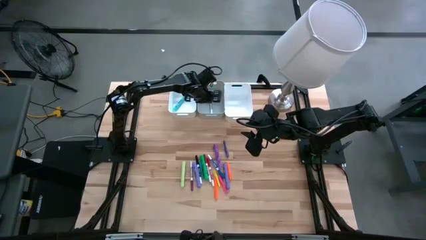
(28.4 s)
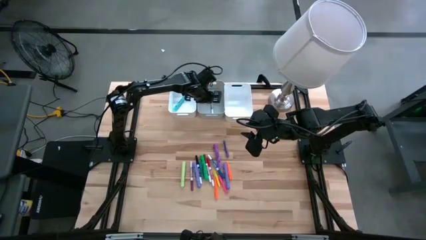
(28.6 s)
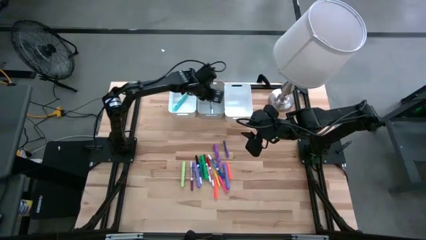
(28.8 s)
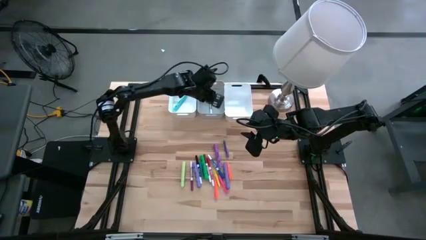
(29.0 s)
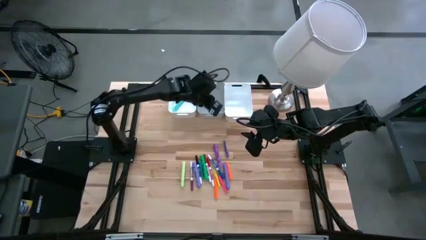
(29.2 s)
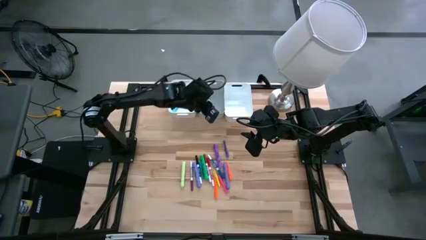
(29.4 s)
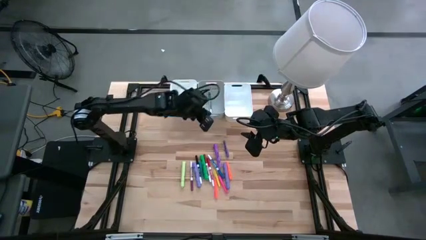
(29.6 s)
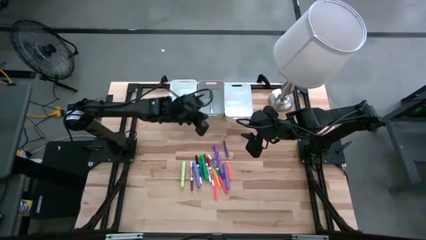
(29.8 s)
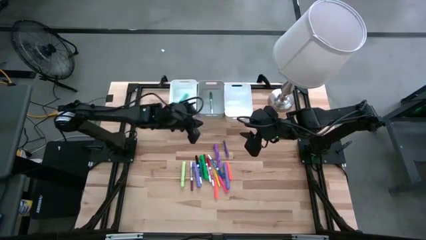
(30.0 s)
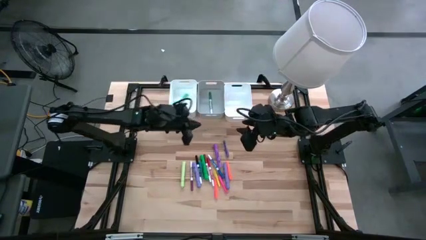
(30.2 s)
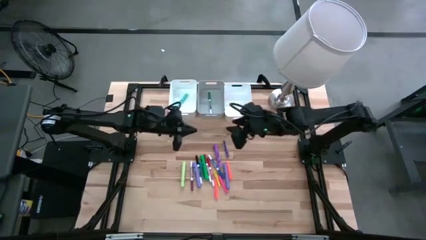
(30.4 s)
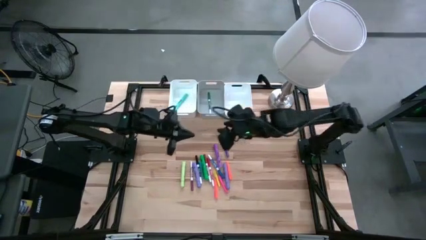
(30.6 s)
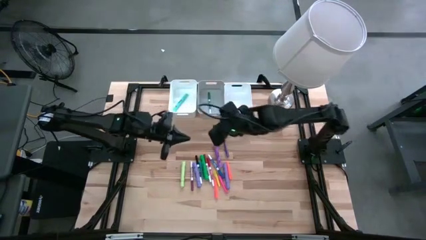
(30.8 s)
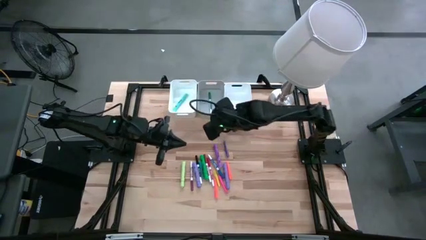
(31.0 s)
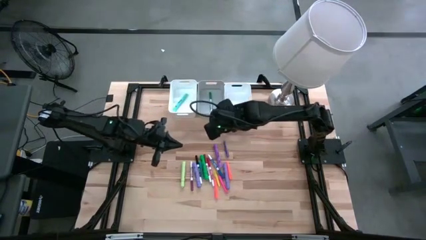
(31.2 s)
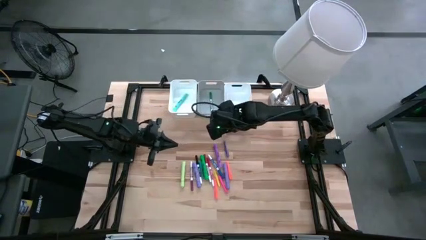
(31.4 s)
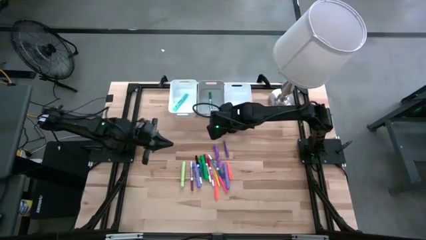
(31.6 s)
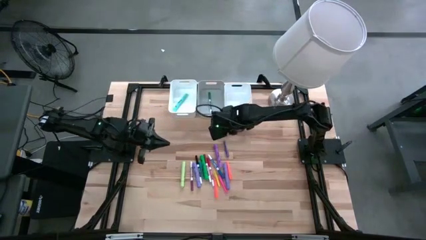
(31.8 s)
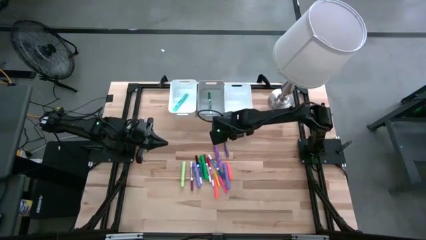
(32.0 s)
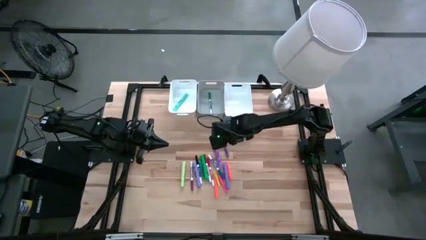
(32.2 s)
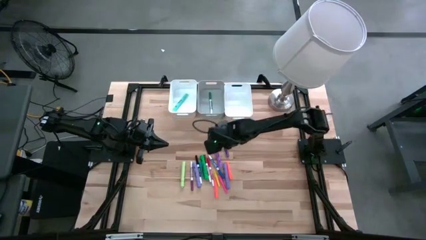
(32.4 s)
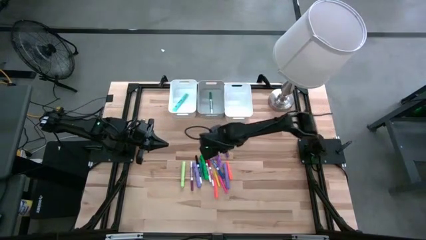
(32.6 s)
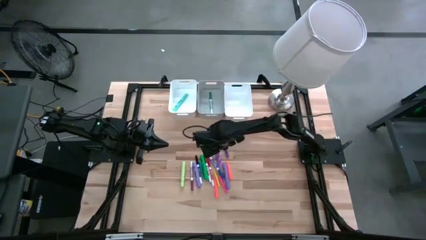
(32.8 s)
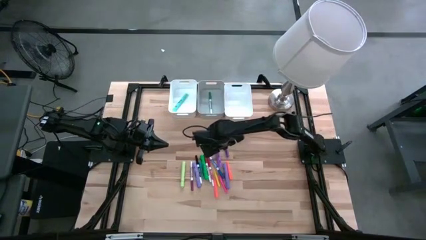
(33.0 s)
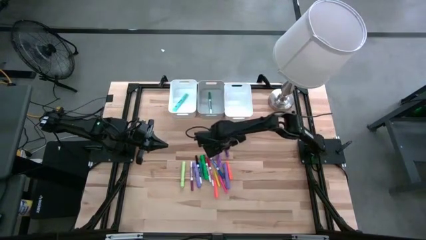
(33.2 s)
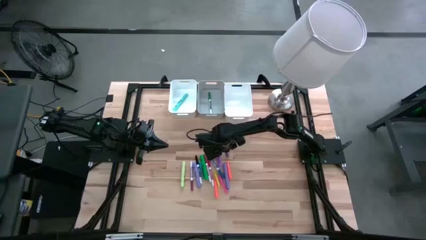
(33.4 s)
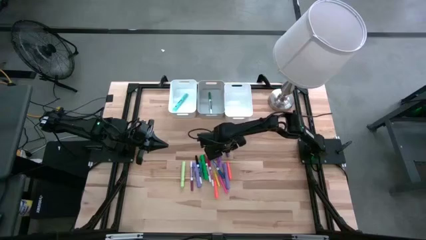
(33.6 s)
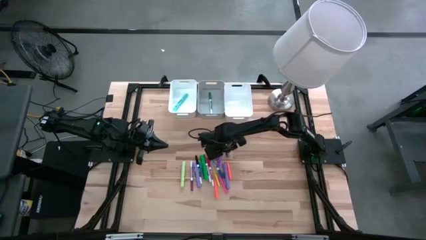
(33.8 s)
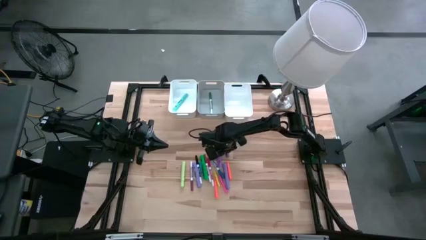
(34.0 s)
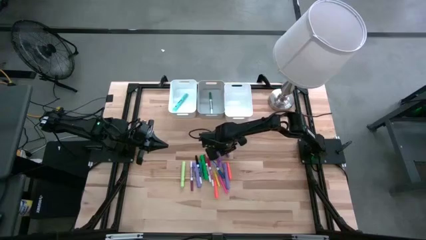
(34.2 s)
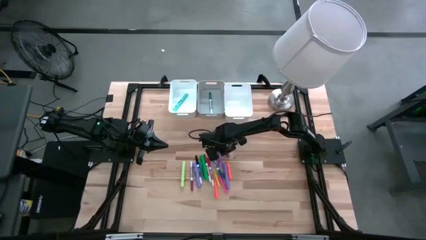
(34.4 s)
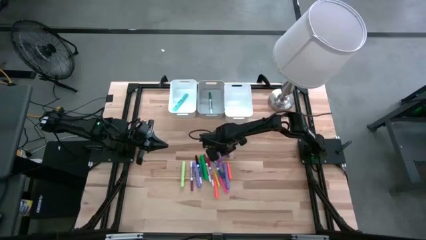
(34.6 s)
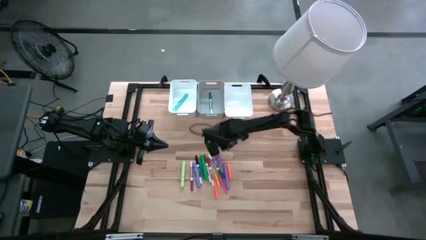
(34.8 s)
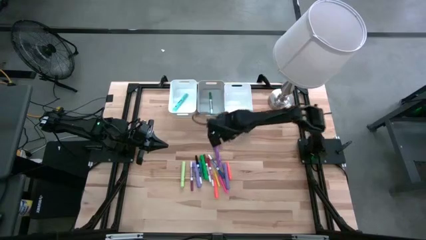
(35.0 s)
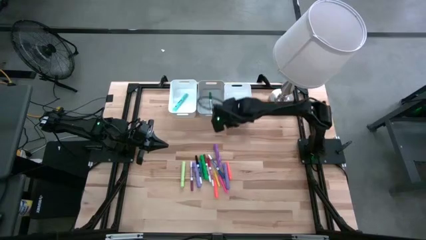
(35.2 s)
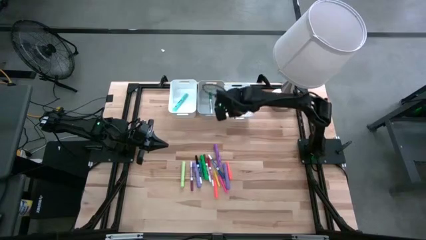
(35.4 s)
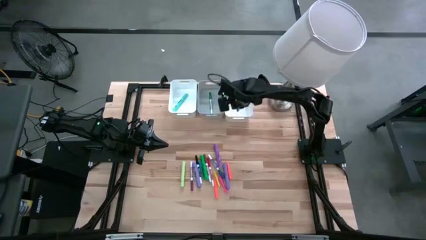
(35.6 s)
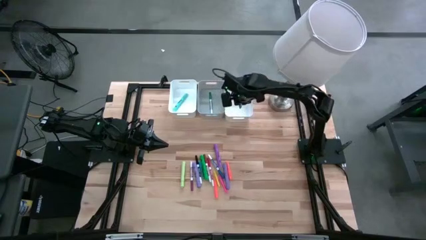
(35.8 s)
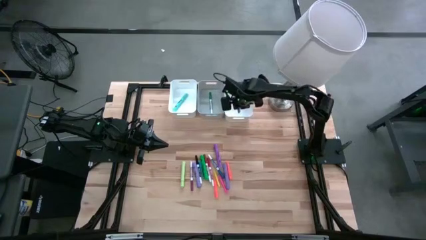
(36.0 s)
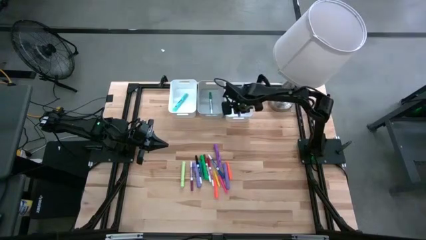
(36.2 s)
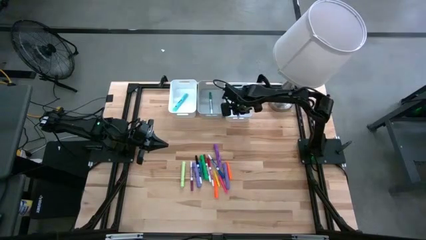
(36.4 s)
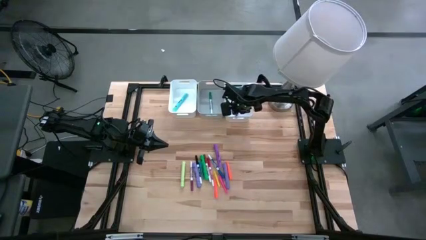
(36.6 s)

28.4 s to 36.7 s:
Task: Pick & Place Markers
Put the violet pen into the right white bin

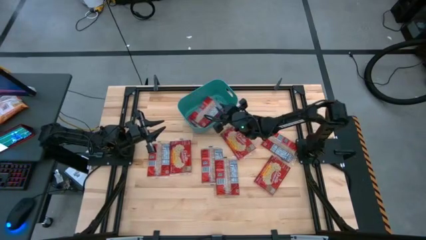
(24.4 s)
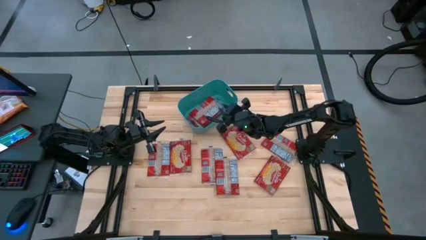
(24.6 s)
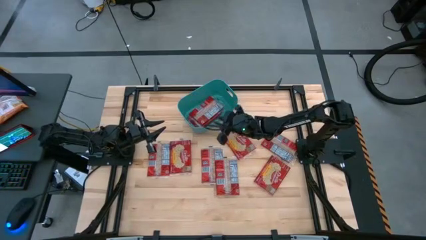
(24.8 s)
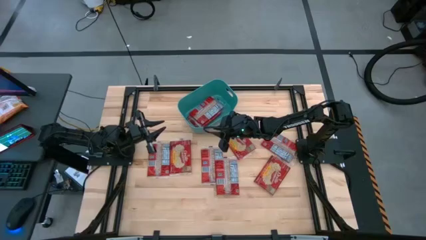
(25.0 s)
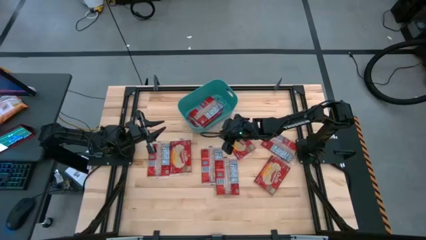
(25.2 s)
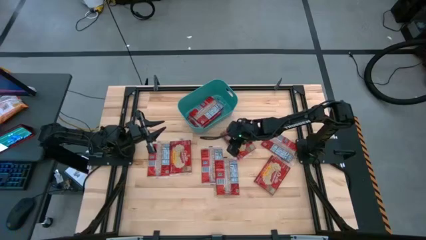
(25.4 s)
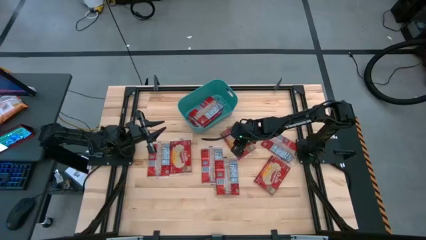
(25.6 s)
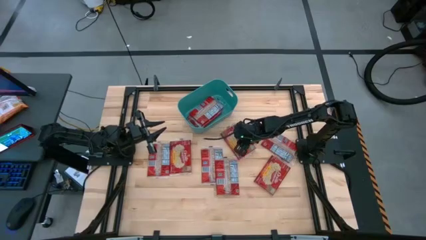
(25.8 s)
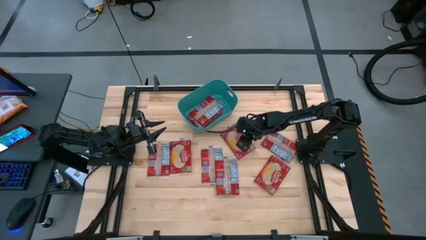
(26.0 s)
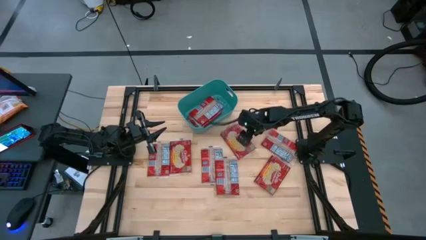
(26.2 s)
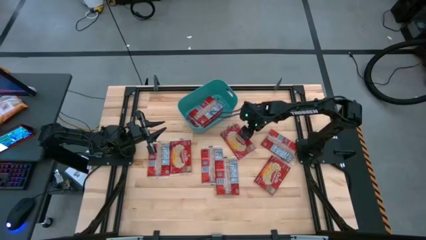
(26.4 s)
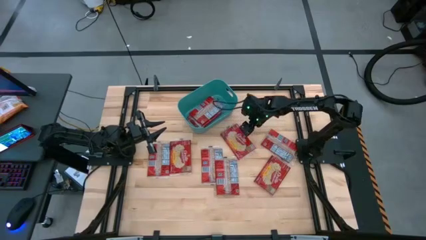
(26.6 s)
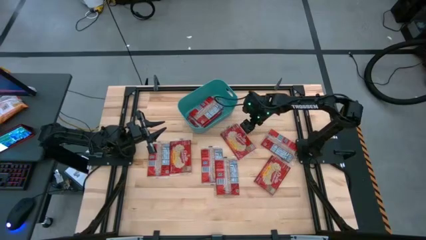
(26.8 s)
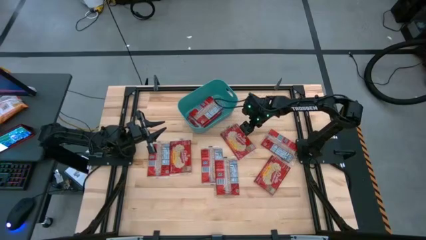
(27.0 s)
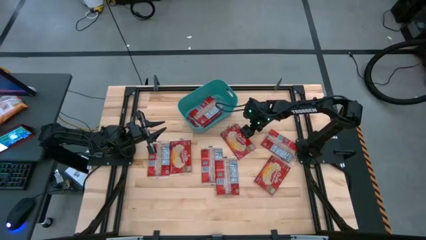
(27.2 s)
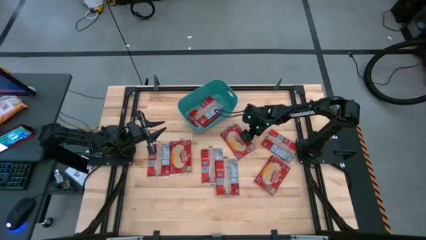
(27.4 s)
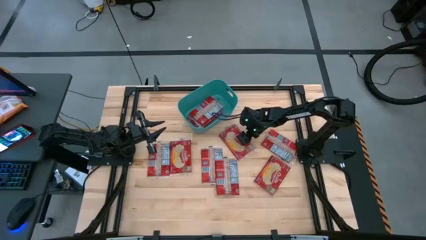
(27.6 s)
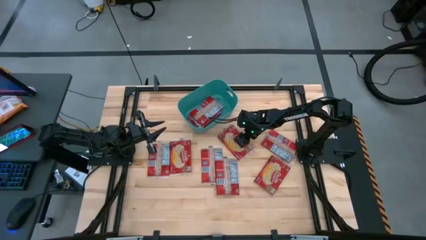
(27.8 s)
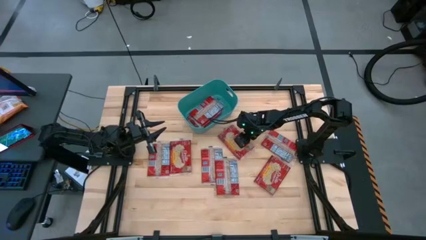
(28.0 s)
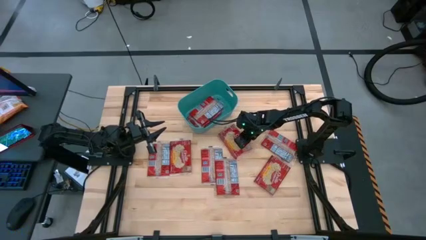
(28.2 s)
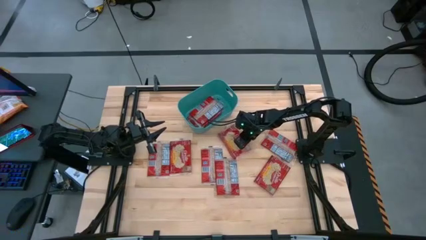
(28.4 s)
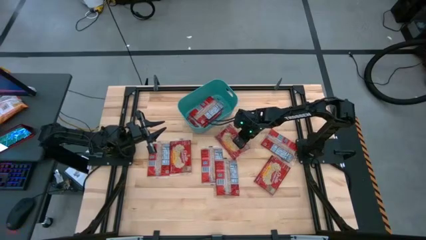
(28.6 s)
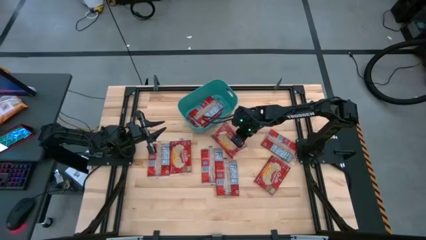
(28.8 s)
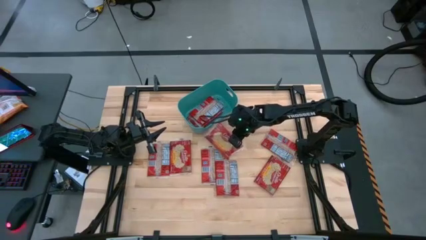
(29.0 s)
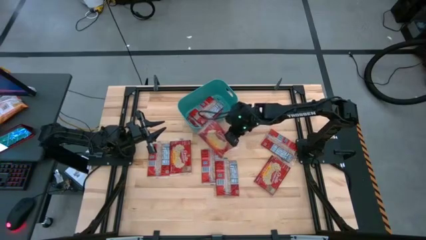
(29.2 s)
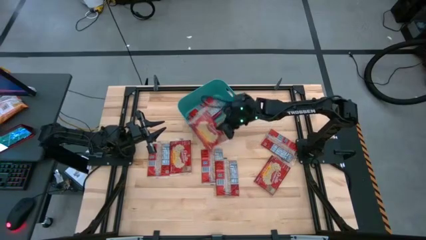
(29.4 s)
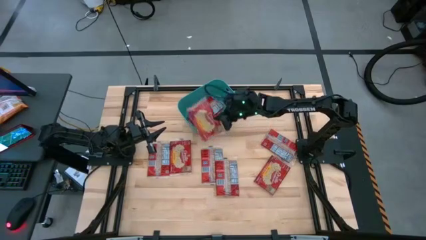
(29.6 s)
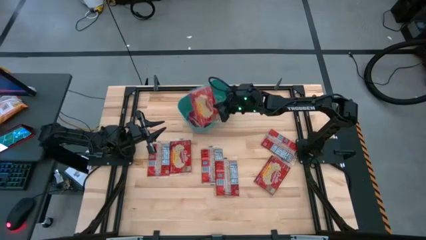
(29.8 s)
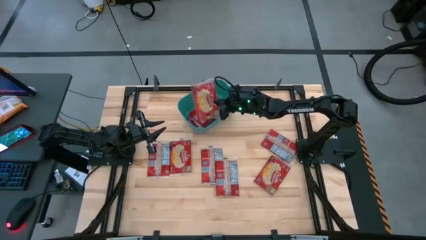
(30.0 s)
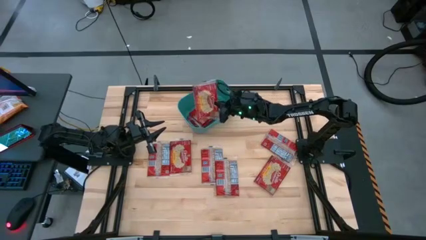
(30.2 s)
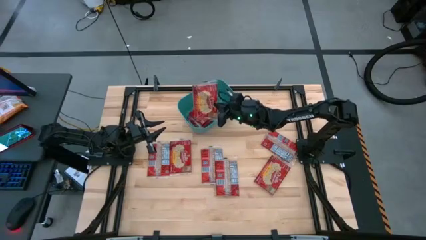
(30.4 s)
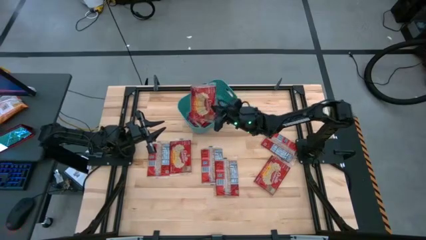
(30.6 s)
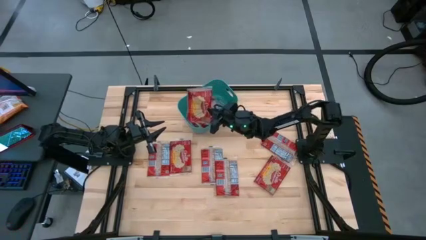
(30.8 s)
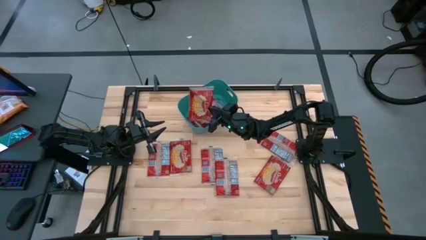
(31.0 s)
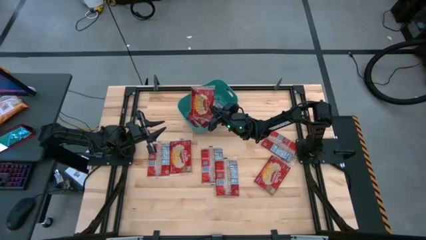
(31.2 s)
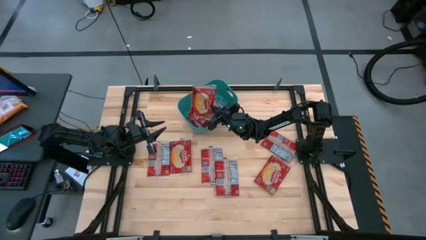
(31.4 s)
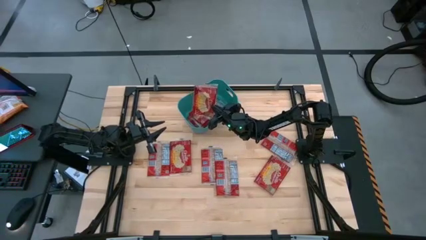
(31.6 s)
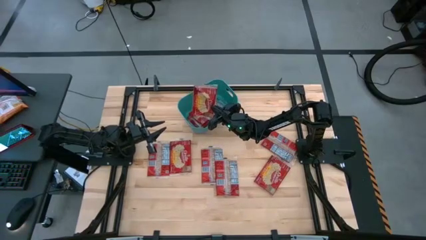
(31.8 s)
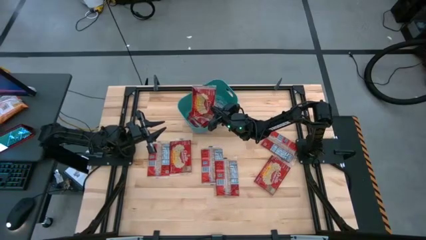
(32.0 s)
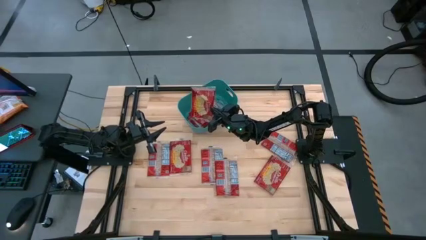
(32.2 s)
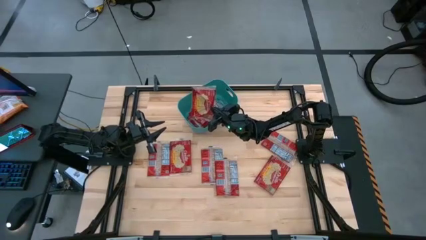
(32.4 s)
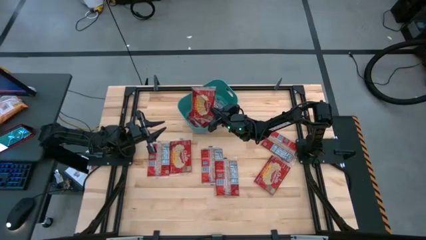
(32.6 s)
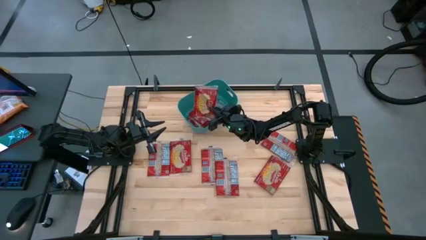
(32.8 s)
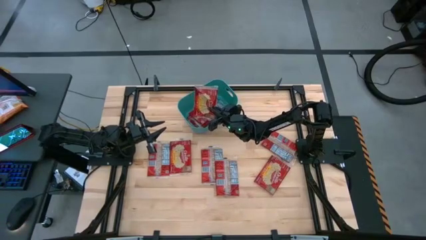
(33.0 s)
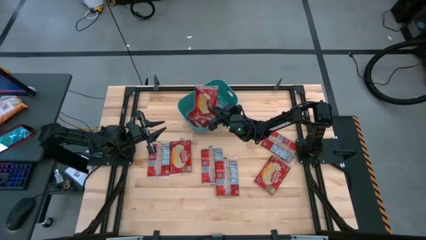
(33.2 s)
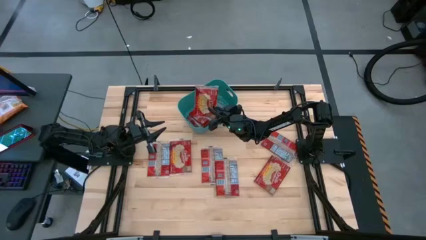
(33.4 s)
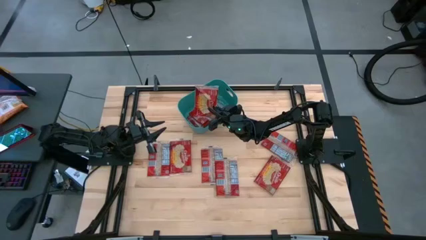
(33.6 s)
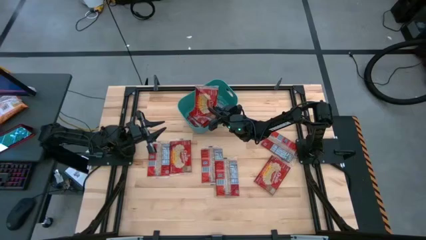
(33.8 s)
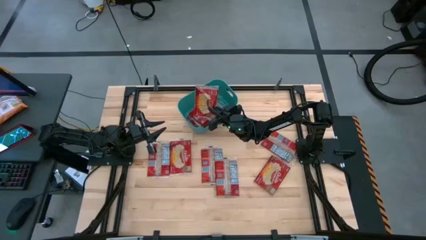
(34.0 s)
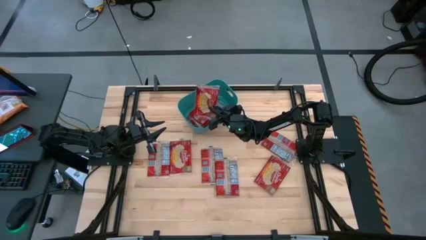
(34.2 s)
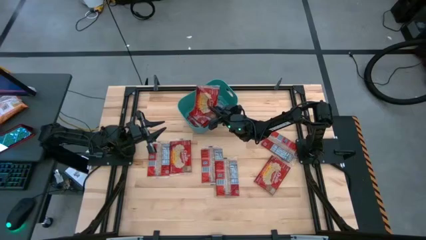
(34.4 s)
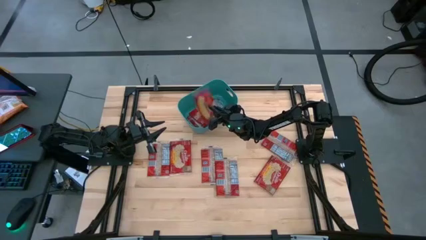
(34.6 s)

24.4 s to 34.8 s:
Task: Sort popcorn bags into baskets
Put the popcorn bag into the blue bin
